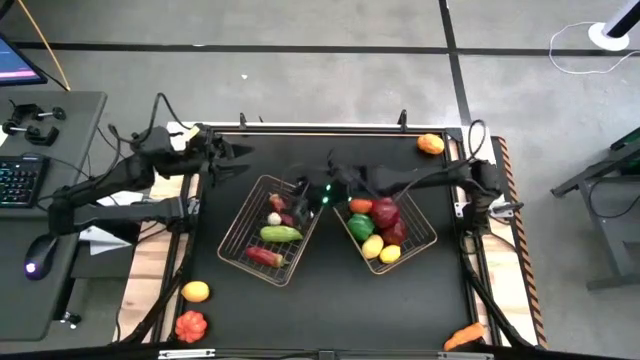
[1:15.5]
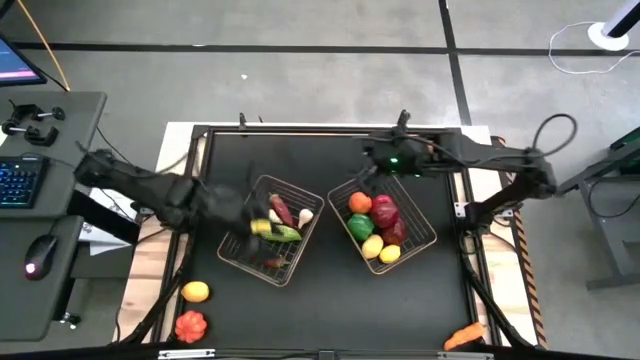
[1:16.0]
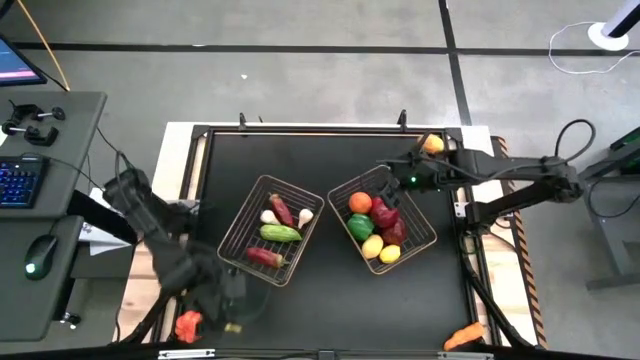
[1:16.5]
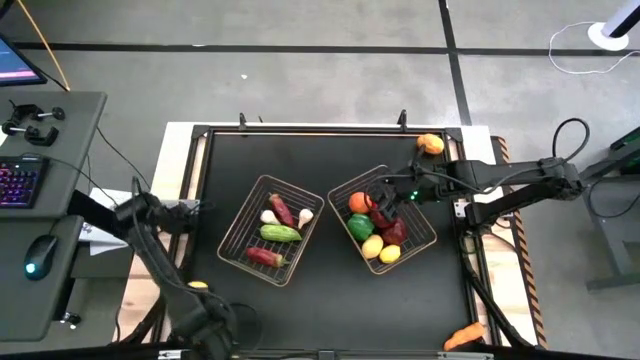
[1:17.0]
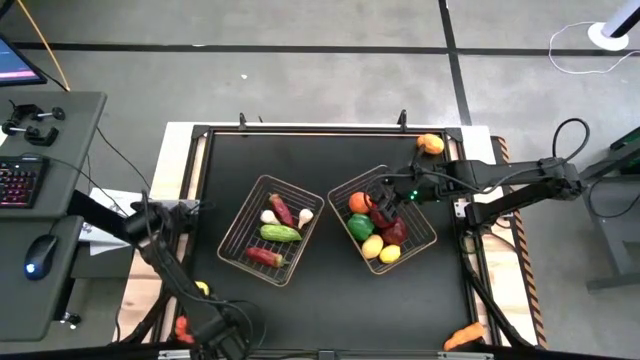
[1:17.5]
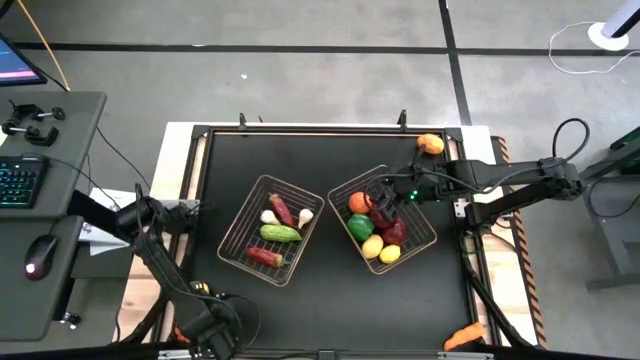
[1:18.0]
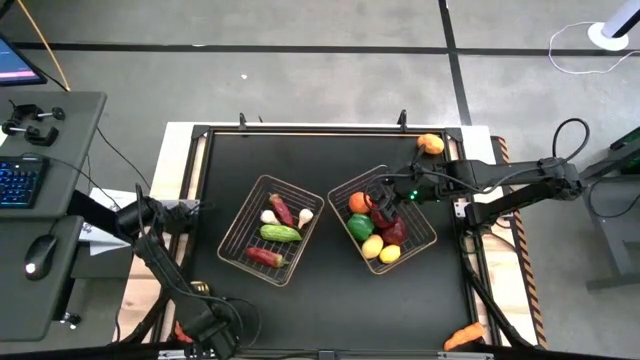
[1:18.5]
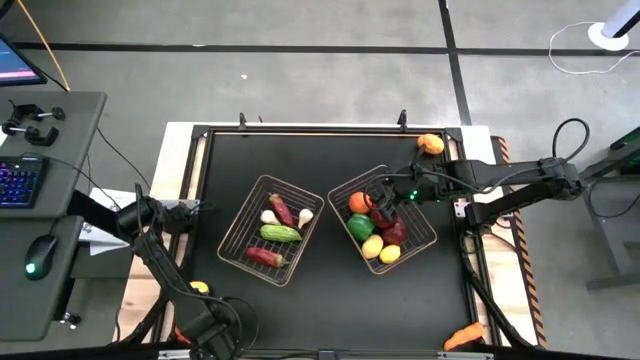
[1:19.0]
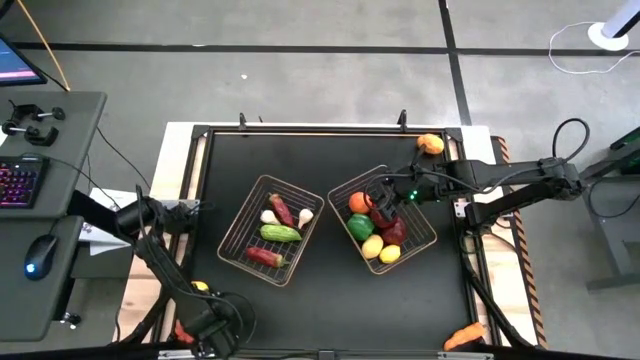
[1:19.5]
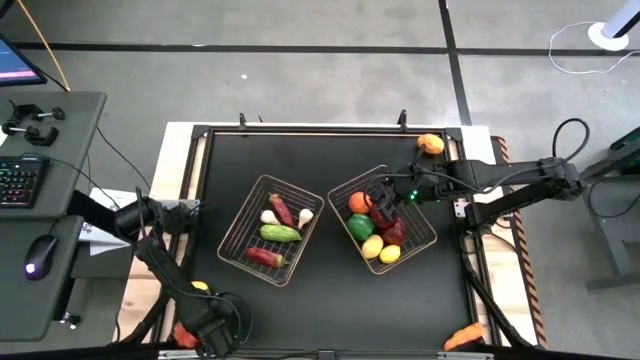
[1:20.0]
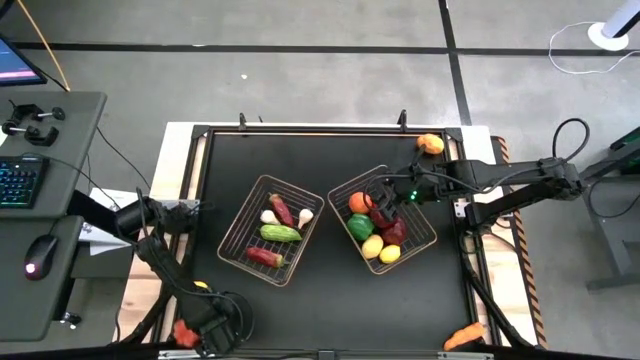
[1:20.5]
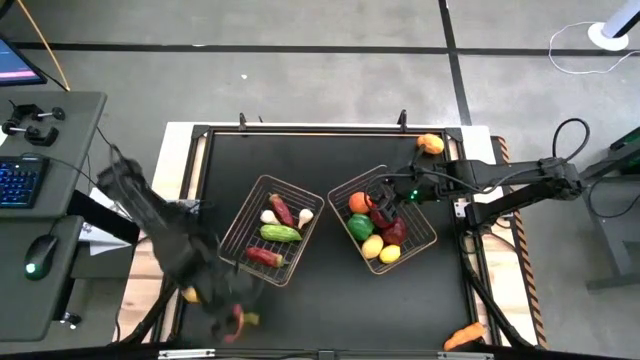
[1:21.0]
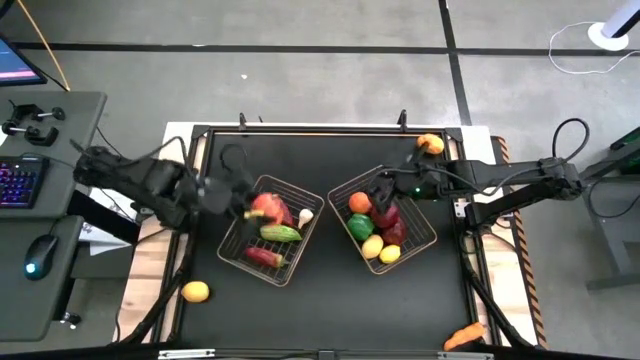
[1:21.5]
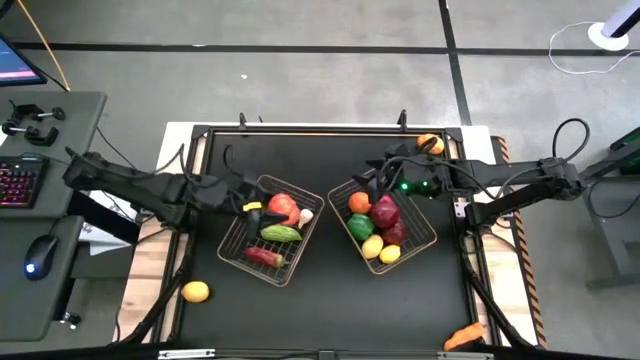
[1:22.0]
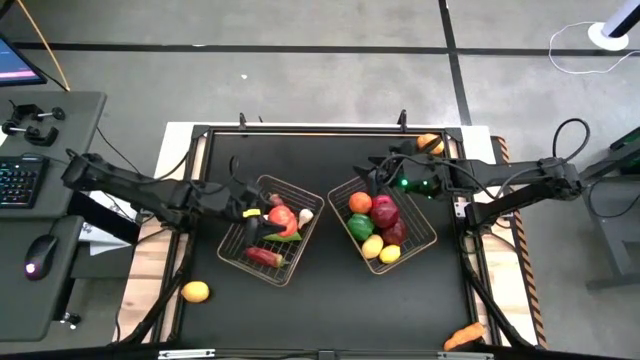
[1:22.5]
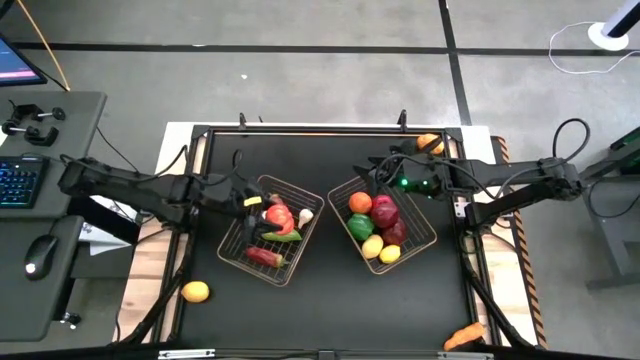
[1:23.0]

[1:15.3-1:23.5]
Task: Sort produce into baskets
Put the pumpkin into the left basket

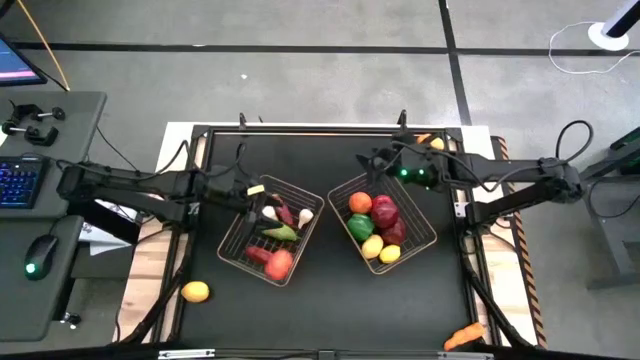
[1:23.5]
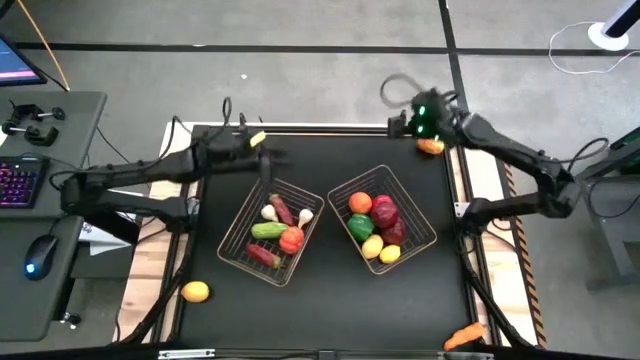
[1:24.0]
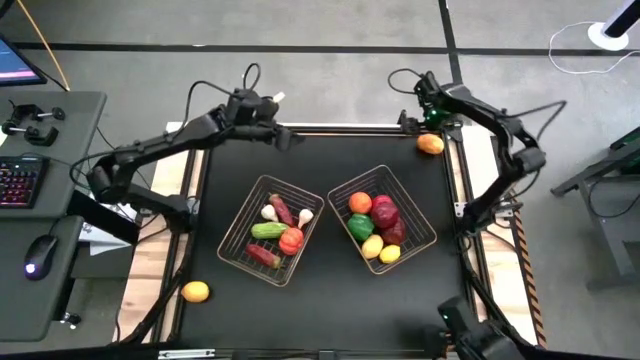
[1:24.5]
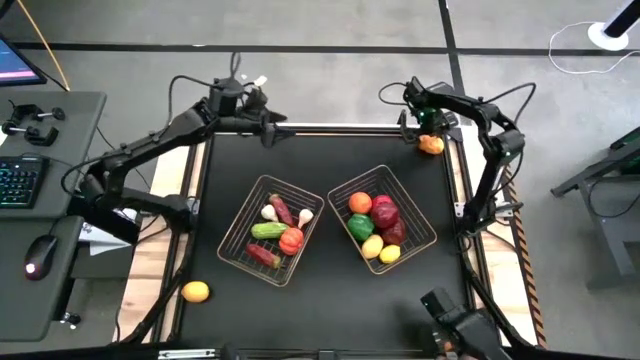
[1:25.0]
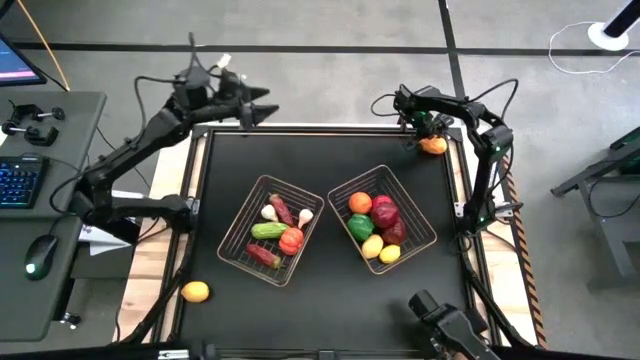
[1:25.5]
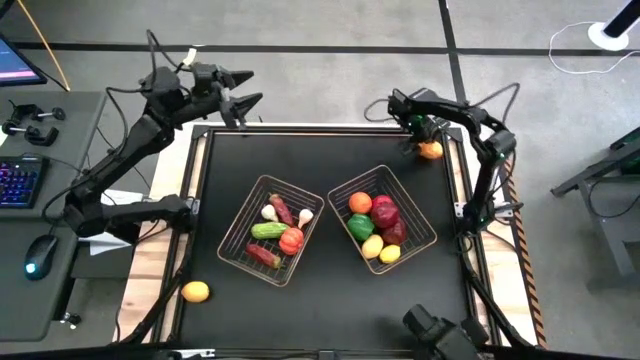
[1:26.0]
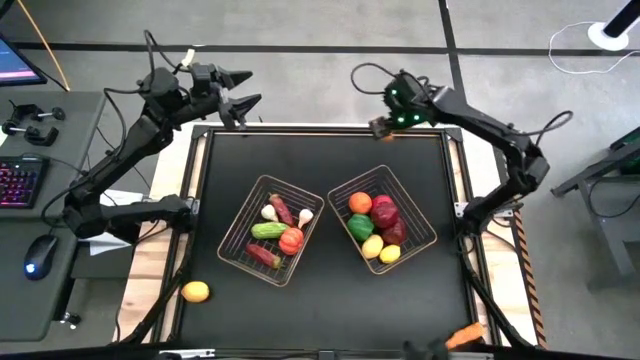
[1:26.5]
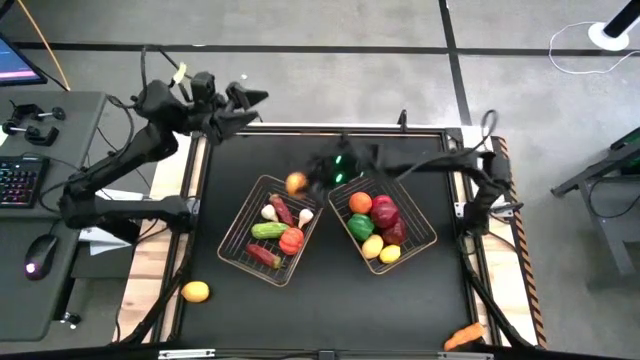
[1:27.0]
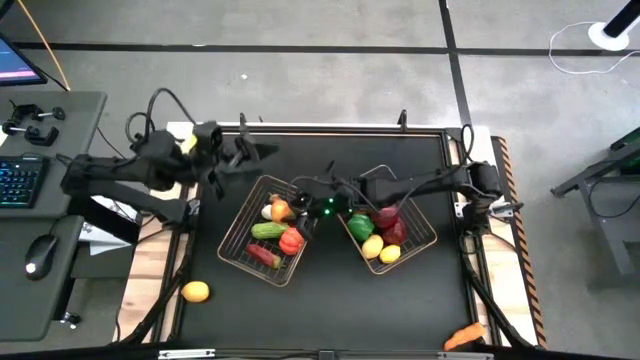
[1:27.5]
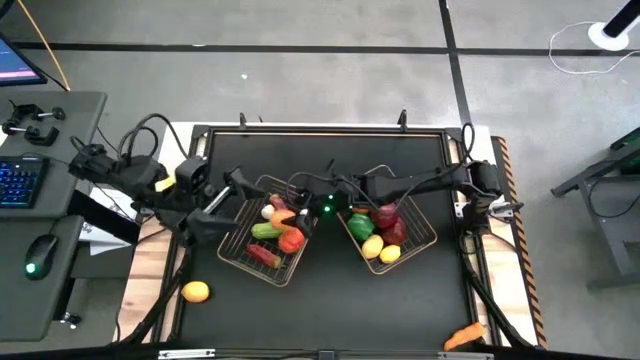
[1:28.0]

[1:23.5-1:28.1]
Put the potato into the left basket

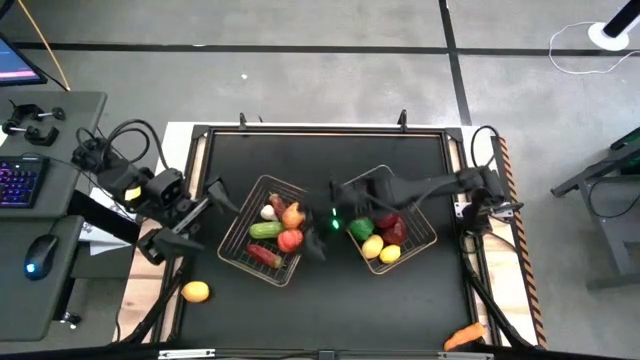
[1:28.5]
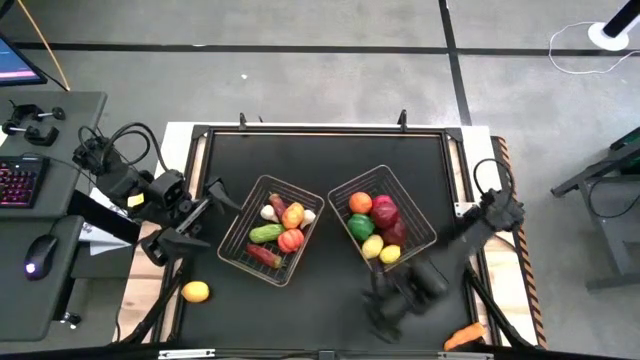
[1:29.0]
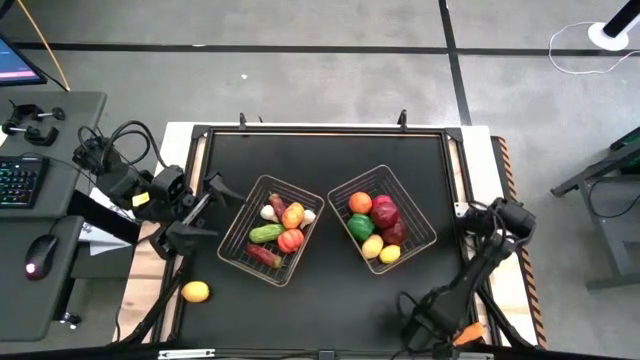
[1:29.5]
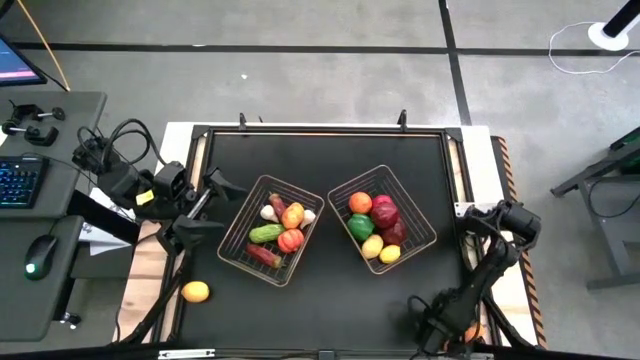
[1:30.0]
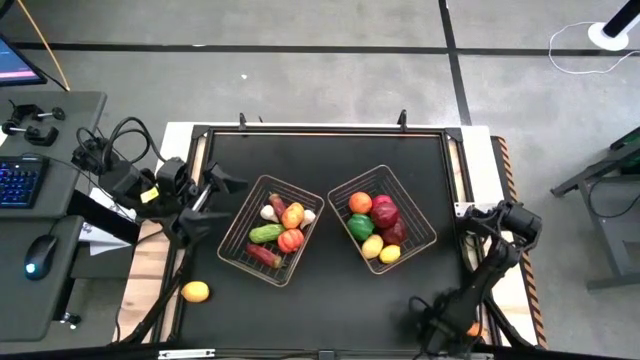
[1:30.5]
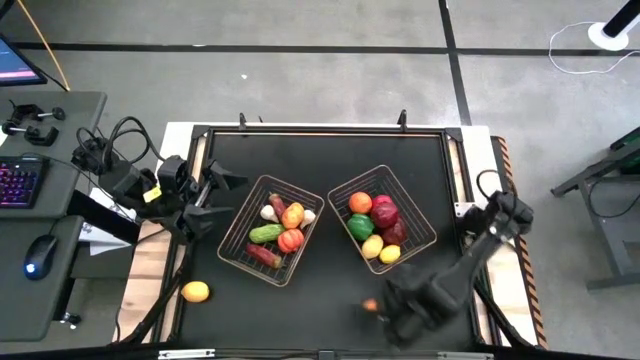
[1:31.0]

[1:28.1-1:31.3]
Put the orange chili pepper into the left basket

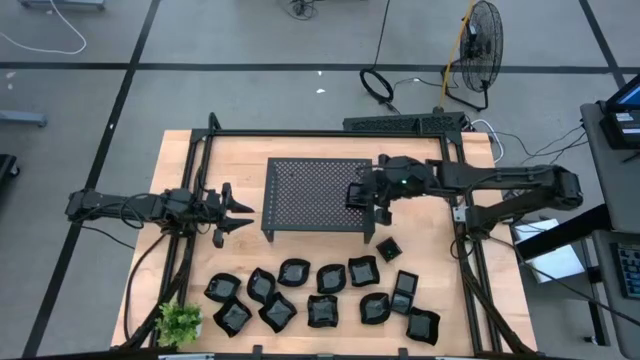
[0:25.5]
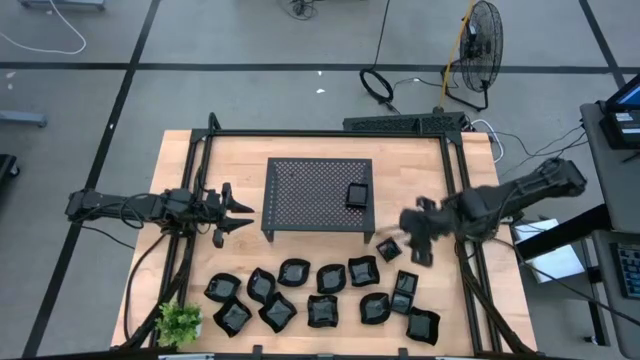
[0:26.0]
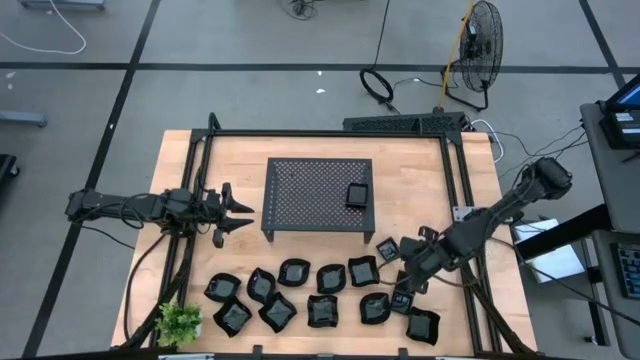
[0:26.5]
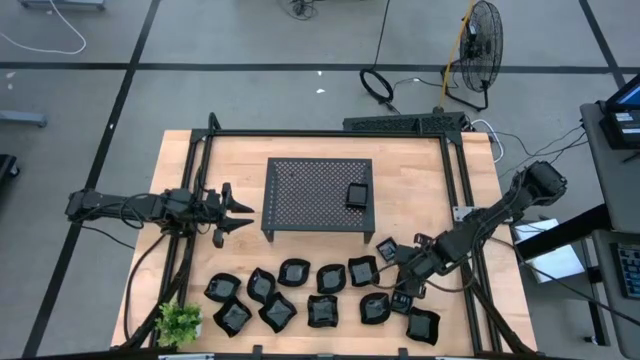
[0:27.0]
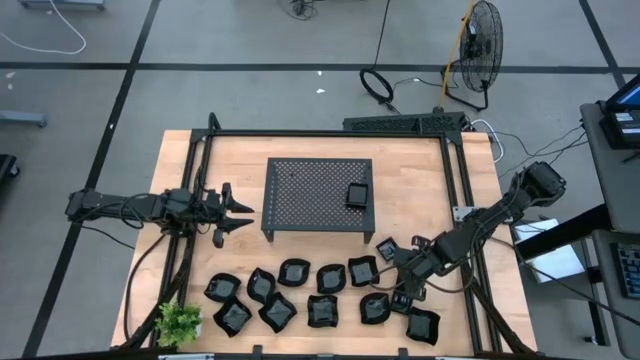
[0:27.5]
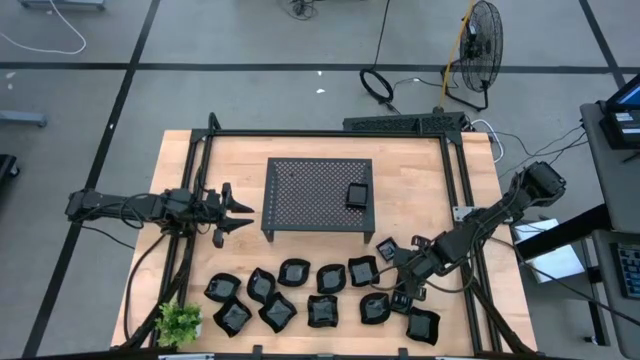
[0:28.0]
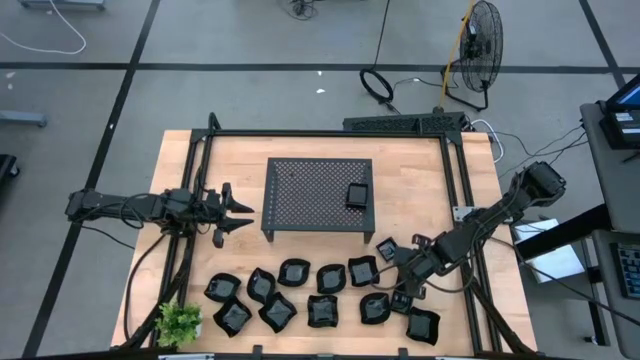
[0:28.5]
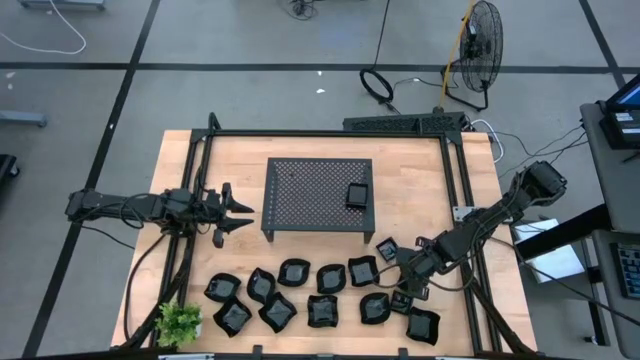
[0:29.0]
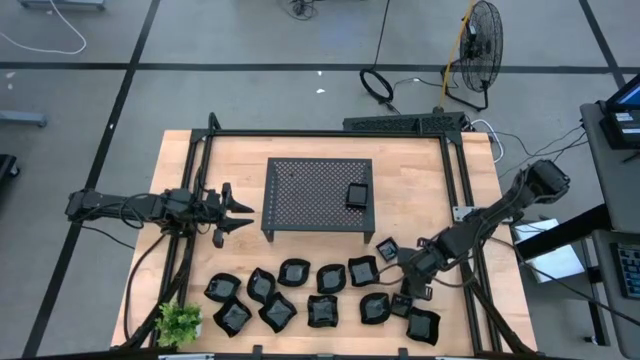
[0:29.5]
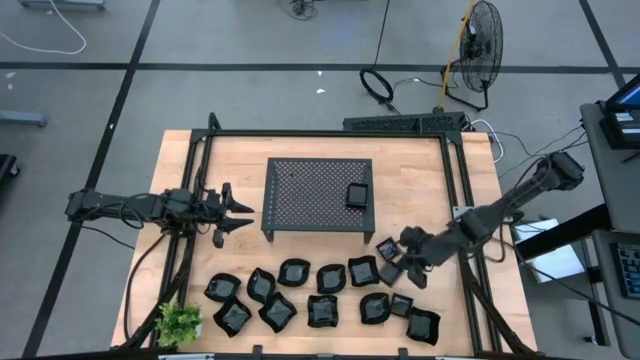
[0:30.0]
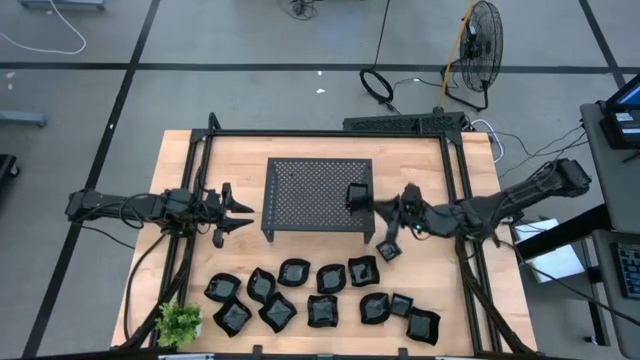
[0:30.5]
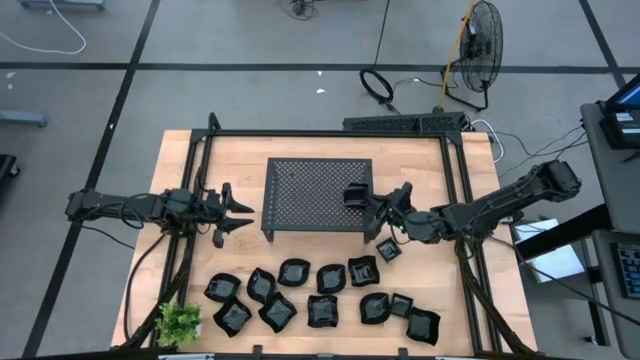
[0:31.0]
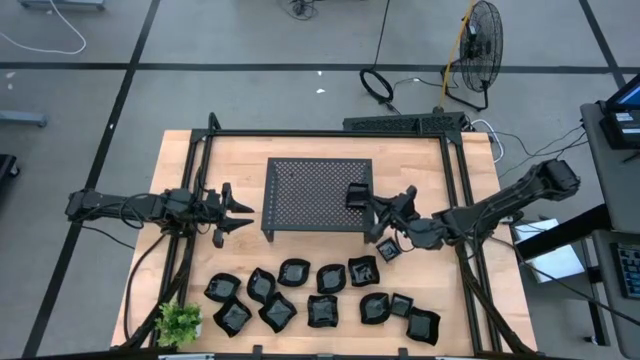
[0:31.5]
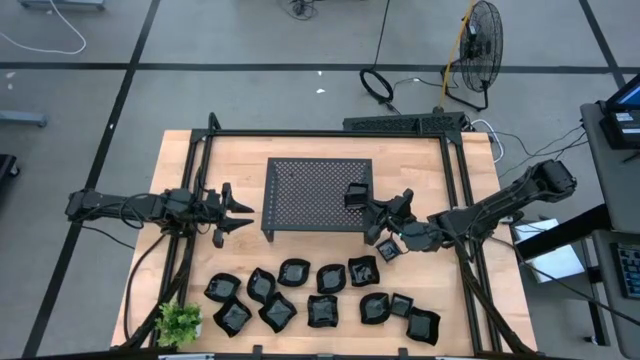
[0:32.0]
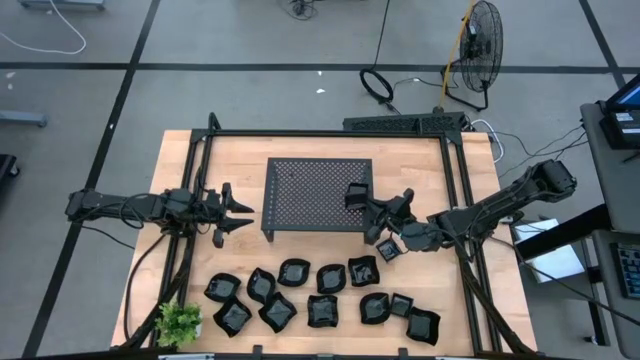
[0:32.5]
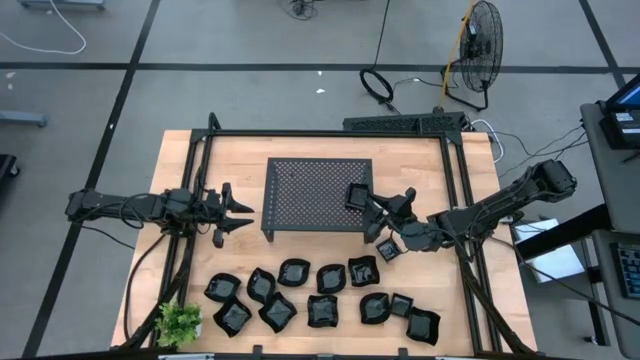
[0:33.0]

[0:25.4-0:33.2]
Task: Pick & Place Mini shaped plates
Stack the square plate onto the stacked square plate on the shelf
